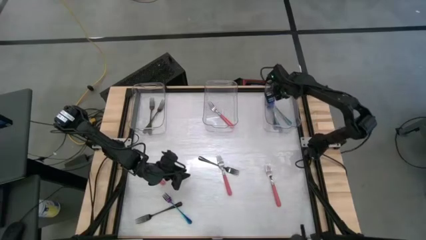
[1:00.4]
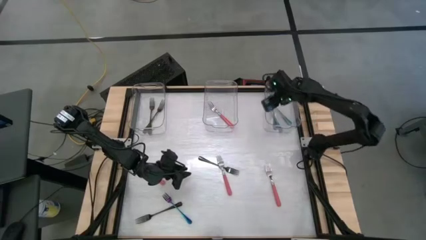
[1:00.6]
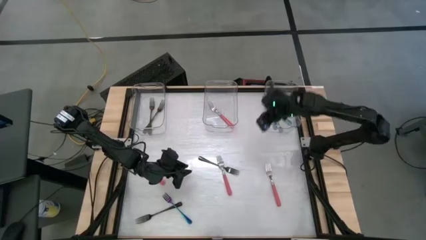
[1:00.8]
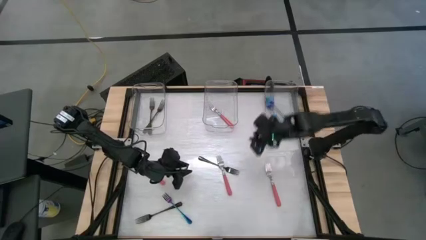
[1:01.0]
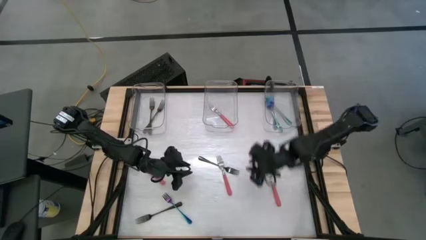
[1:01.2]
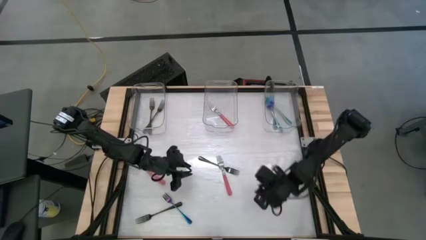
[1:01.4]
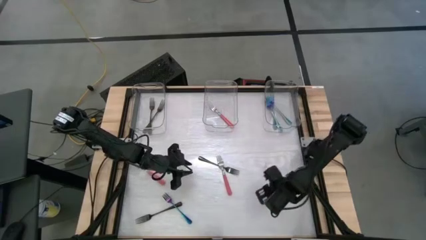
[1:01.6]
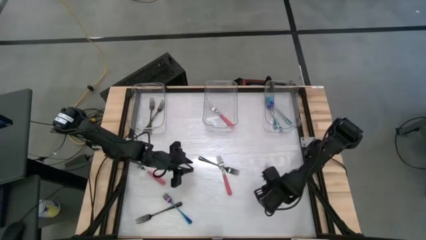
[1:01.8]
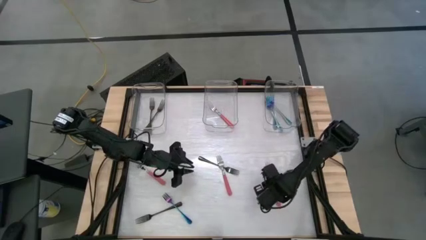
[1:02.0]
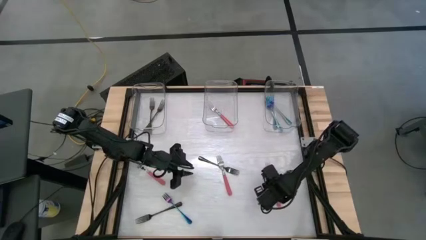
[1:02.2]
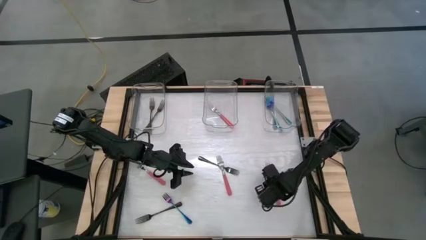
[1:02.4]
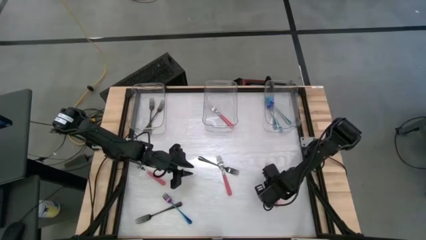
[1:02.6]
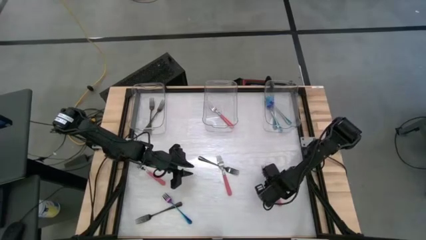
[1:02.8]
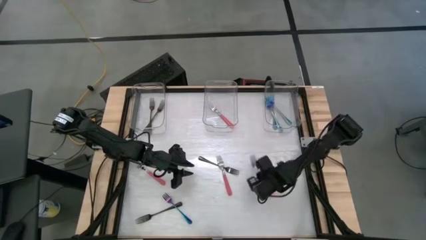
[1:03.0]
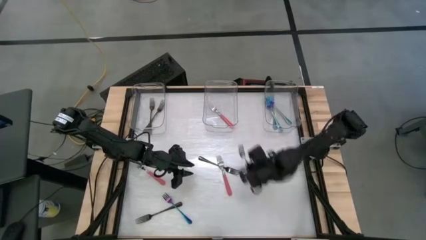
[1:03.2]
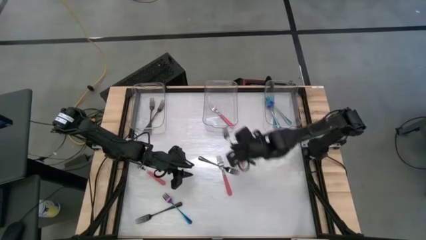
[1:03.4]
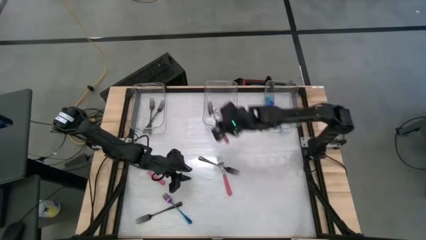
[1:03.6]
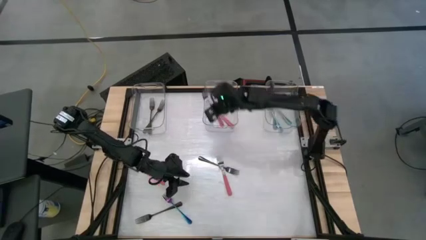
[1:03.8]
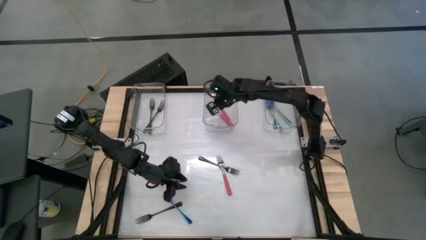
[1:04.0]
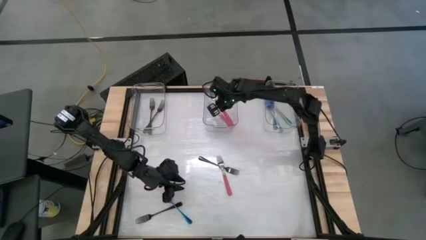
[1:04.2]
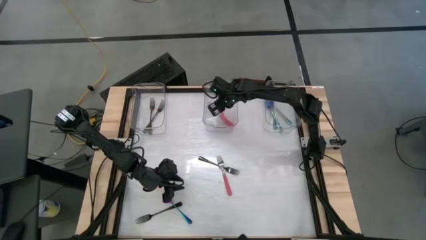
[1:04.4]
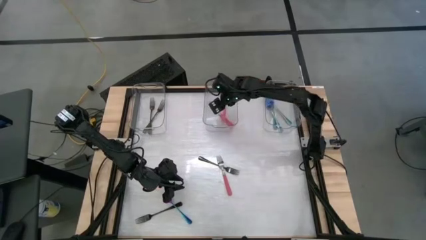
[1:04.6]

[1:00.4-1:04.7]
Task: Sort silverware by color (type)
Put the right pink fork into the middle transparent bin

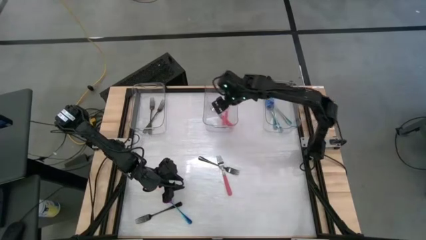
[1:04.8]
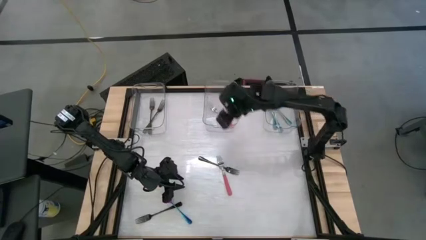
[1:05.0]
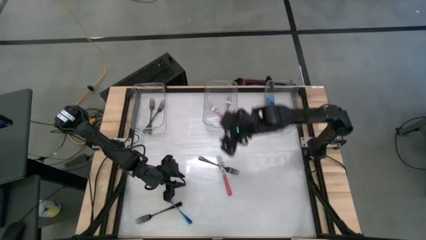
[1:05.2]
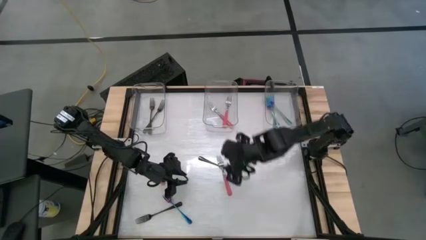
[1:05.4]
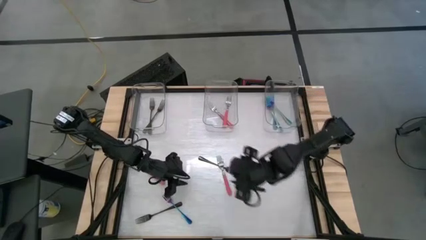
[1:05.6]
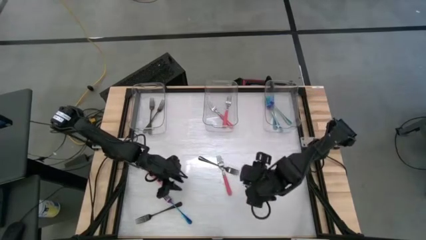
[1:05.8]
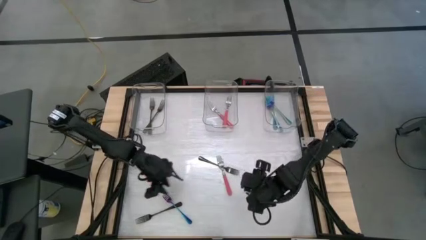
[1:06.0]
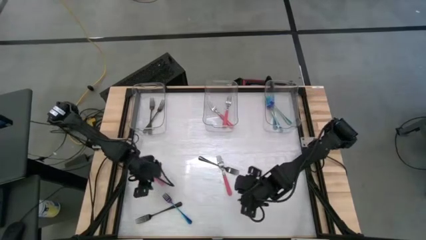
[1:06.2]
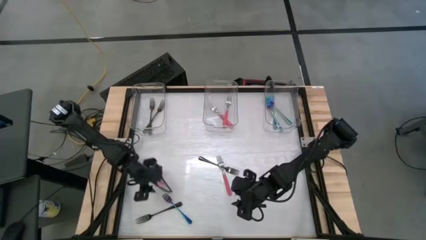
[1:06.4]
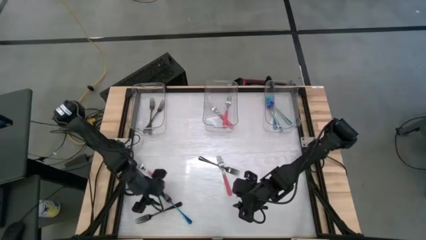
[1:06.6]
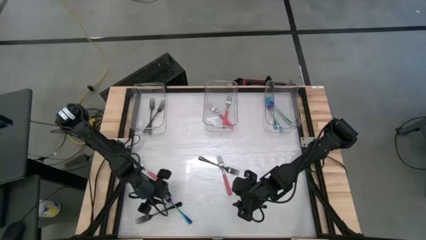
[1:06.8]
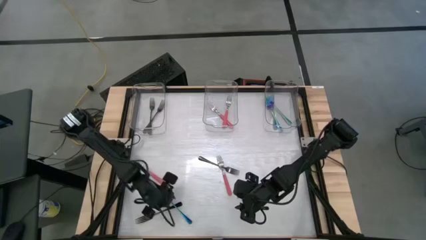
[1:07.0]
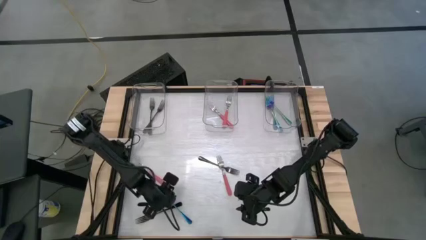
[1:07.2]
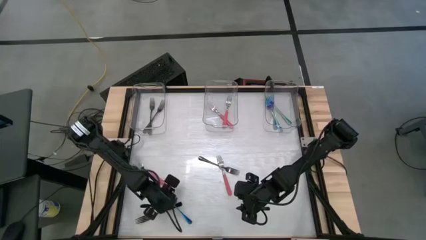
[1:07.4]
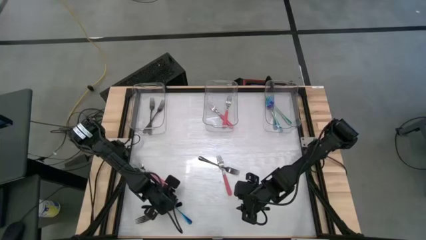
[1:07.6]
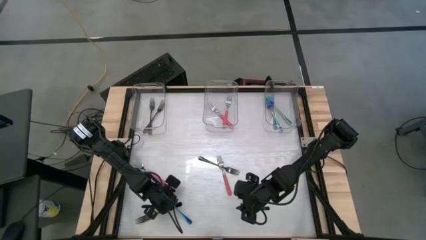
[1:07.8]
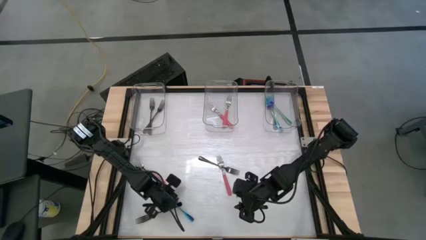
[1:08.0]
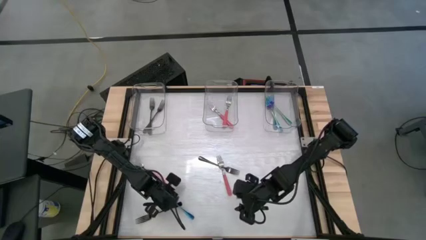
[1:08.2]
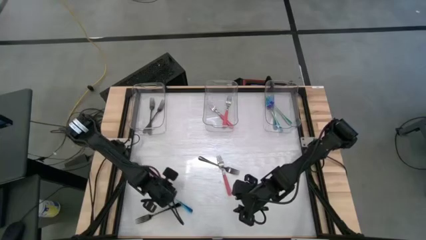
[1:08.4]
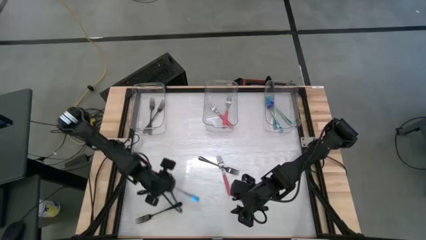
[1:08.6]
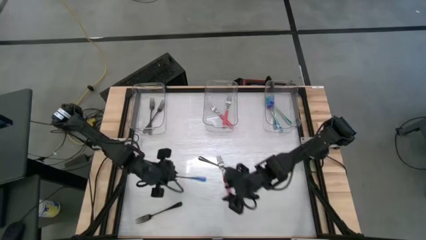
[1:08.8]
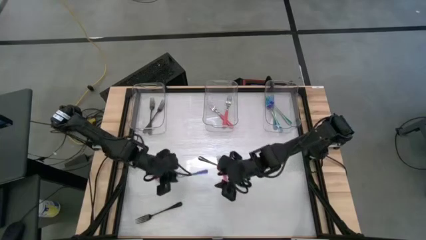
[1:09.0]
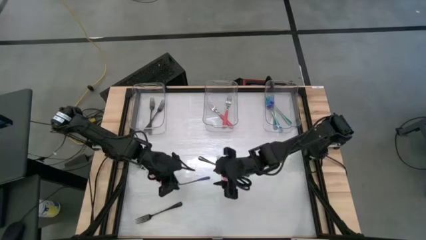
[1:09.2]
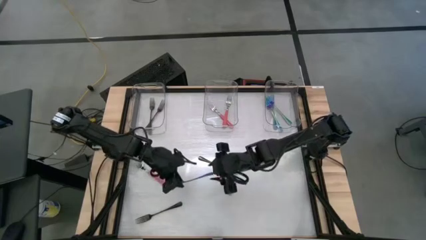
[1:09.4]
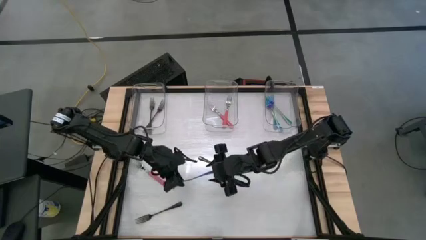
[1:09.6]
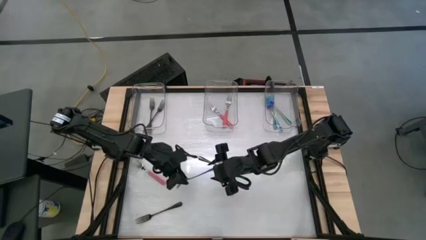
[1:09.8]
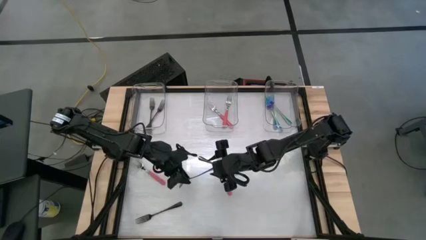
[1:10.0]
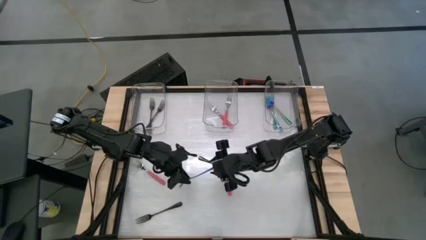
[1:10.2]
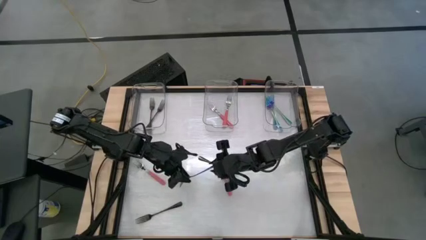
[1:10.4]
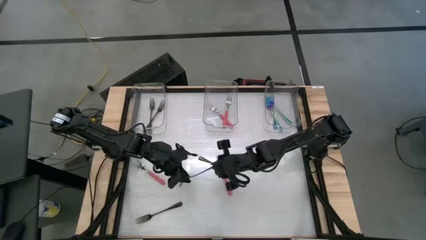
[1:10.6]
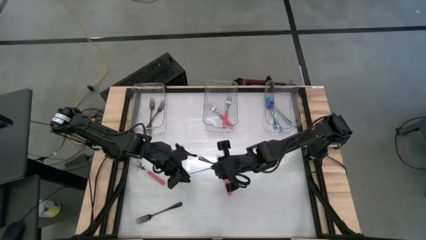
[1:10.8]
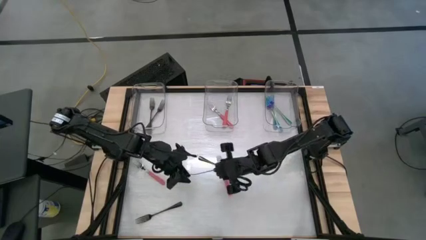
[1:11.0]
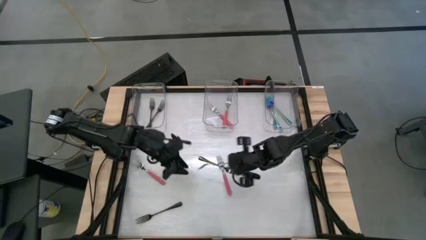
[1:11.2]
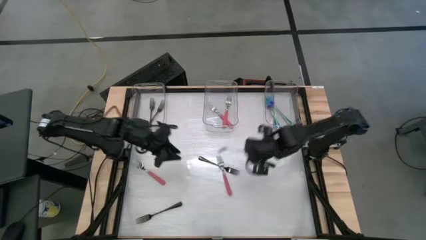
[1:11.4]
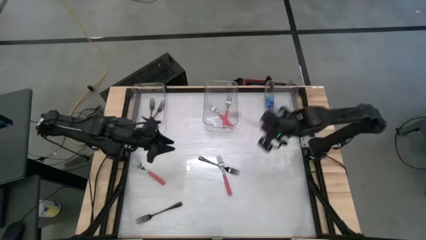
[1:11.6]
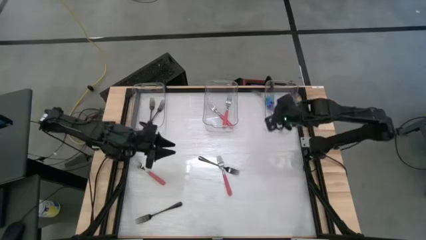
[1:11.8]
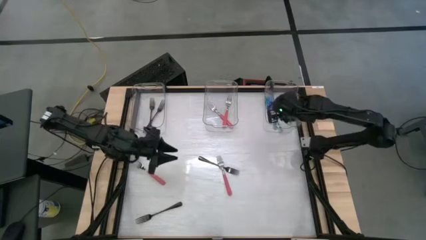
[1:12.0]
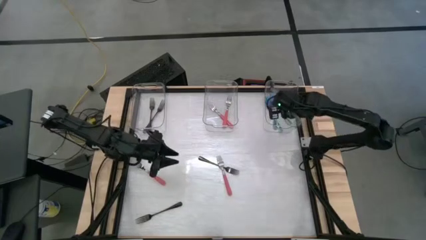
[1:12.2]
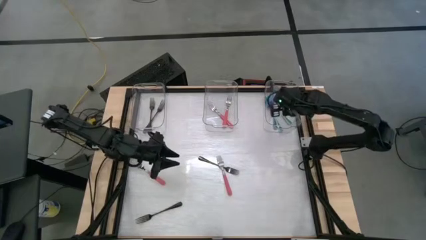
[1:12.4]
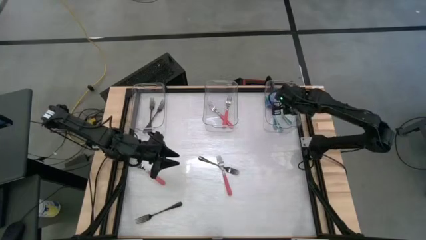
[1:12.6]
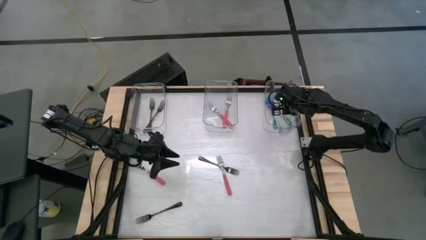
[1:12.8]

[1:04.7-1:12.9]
Put the iridescent fork into the right transparent bin

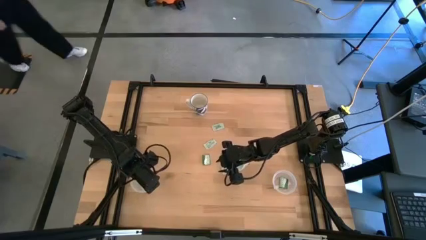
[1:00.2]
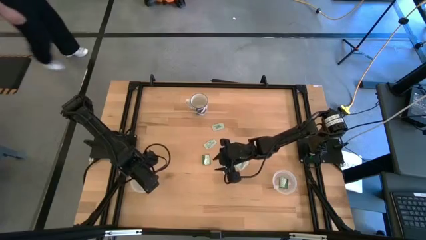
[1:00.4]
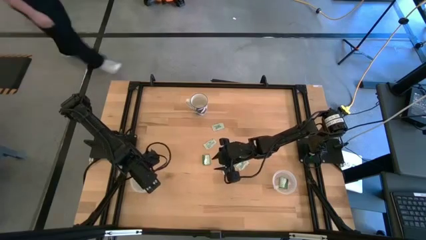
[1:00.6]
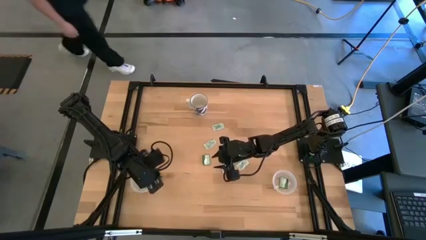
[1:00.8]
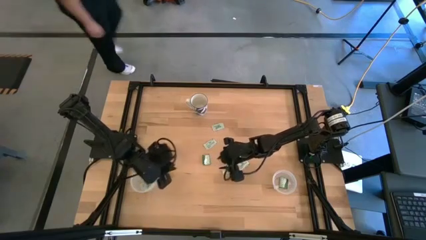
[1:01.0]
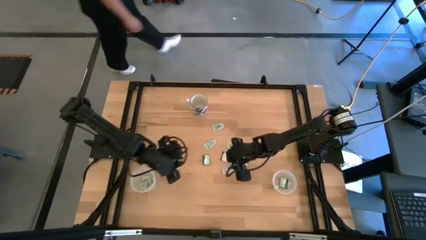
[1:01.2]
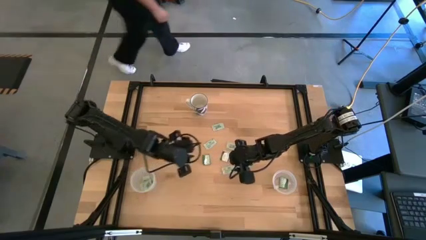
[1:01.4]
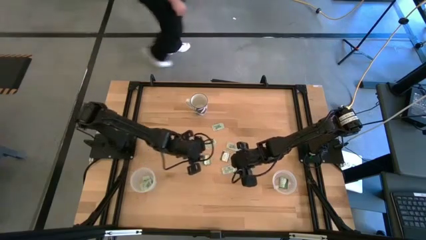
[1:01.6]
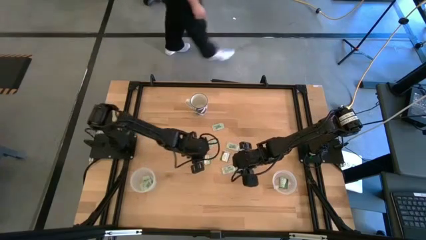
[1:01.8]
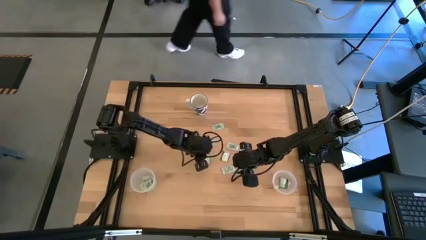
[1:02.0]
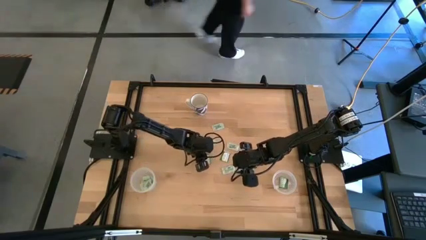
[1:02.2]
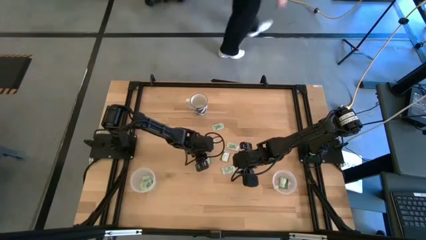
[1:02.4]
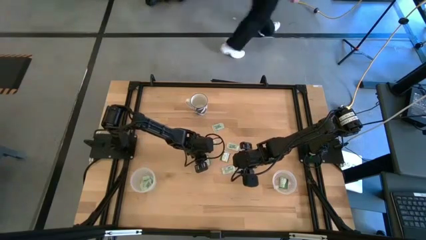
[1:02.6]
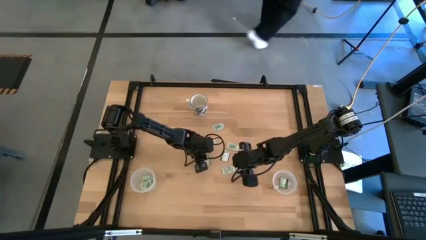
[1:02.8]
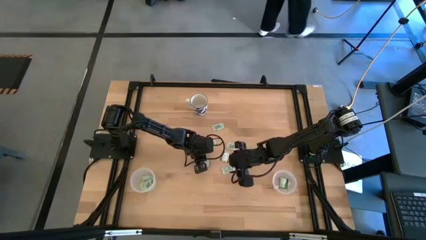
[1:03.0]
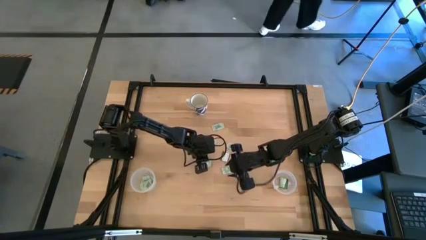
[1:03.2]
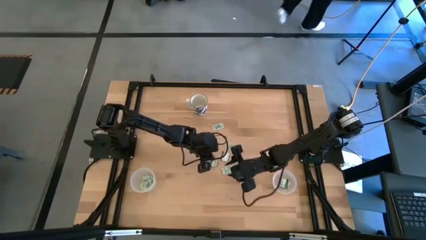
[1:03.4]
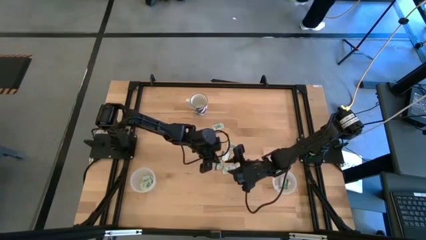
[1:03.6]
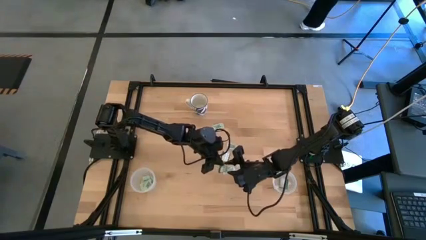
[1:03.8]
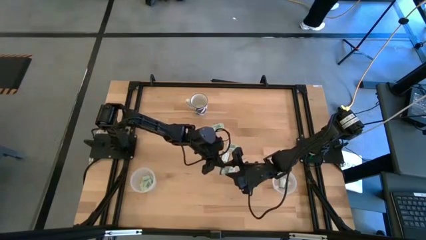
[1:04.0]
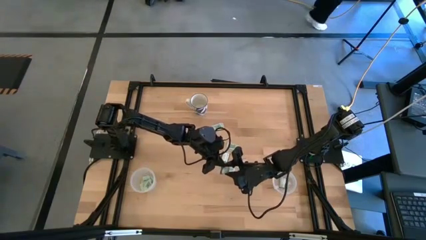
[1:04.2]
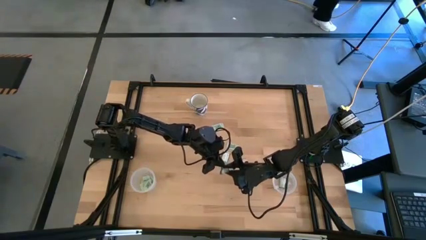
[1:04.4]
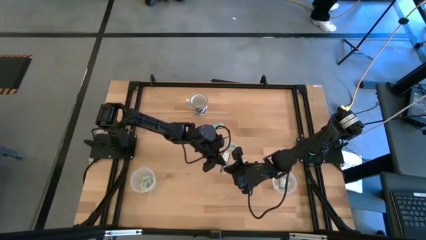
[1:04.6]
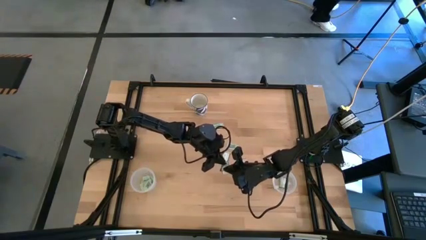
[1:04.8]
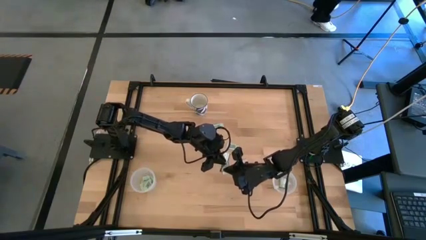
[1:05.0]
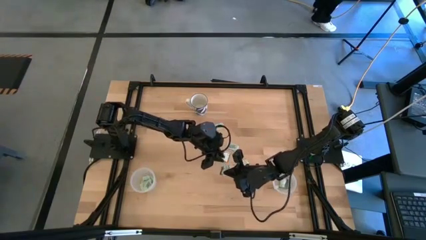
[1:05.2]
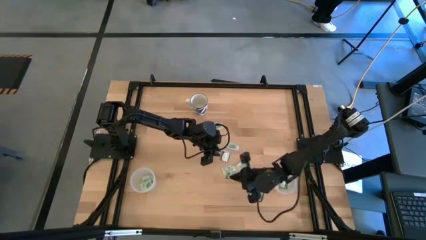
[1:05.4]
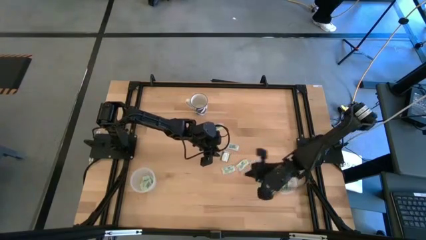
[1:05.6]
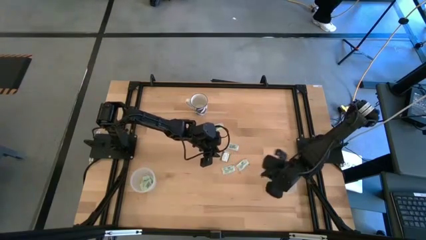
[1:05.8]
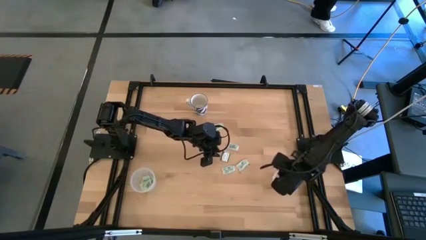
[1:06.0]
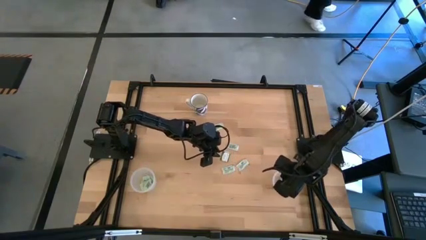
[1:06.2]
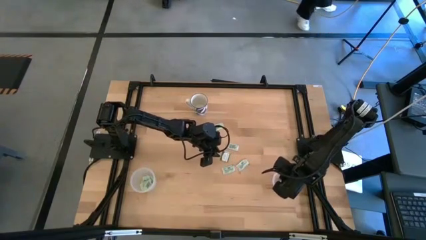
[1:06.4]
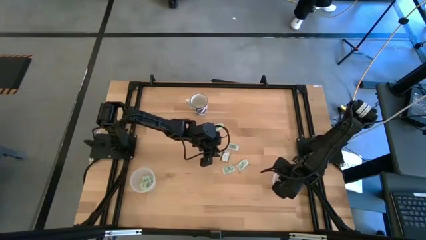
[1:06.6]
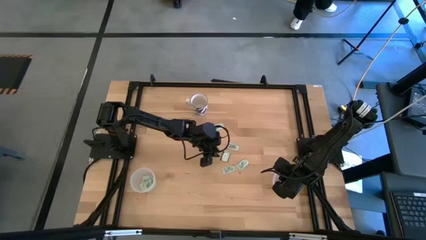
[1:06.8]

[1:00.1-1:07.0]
Task: Pick and place Stevia / Truvia into bins
Put the green stevia packet into the right transparent container
